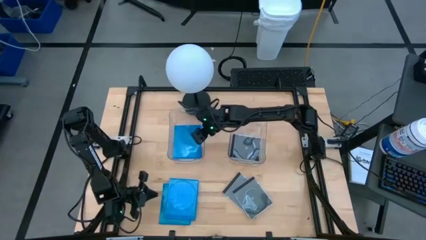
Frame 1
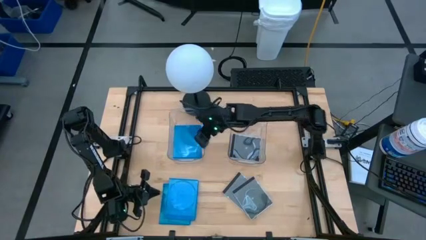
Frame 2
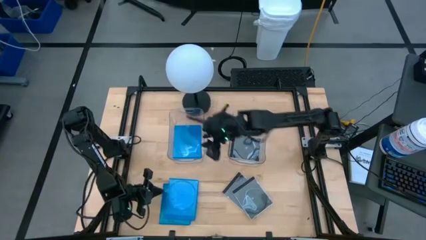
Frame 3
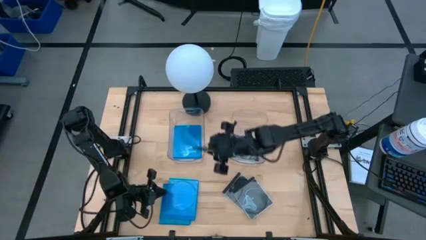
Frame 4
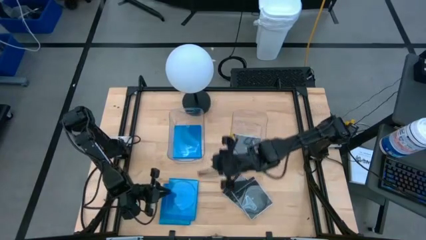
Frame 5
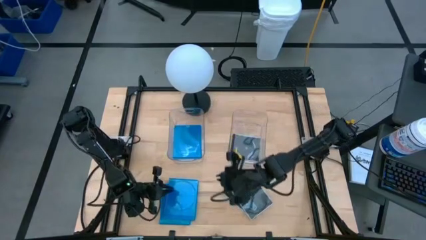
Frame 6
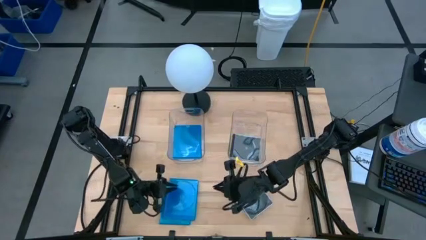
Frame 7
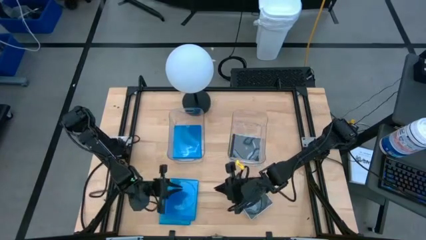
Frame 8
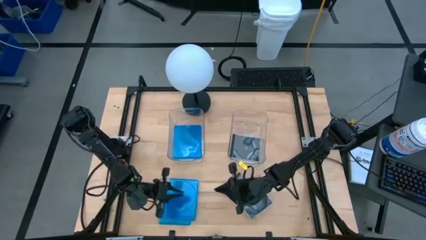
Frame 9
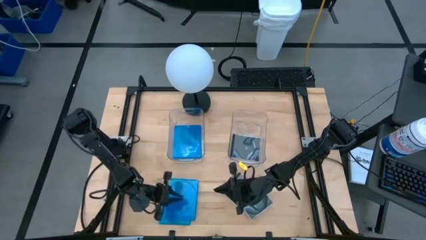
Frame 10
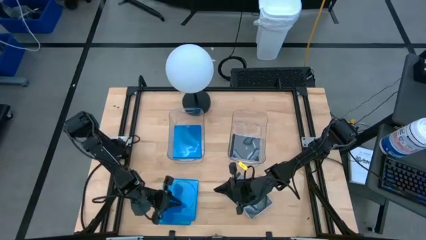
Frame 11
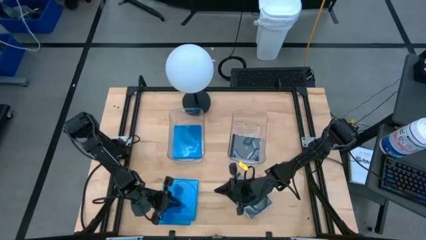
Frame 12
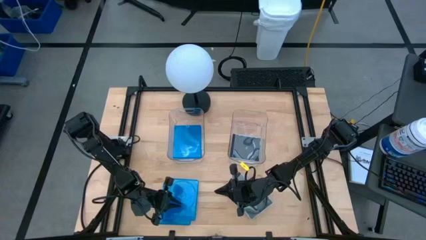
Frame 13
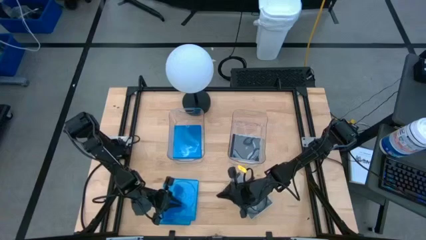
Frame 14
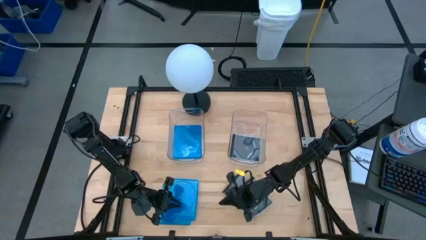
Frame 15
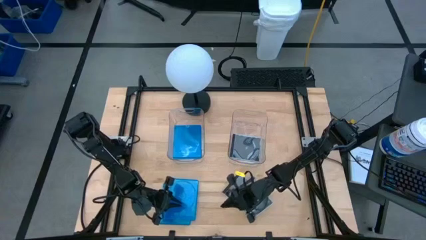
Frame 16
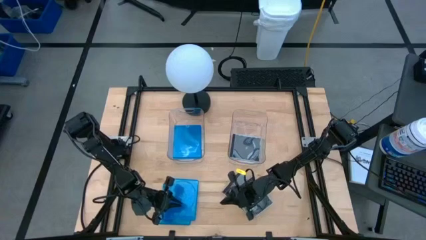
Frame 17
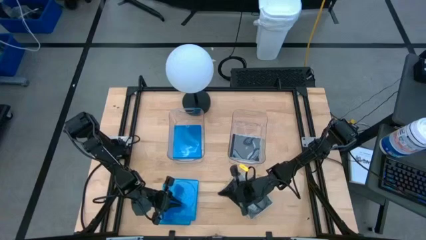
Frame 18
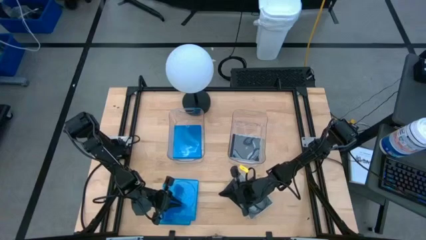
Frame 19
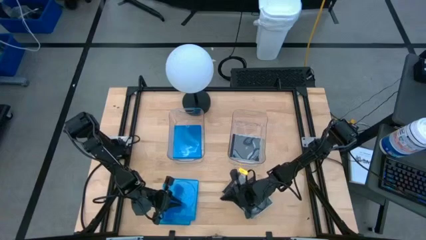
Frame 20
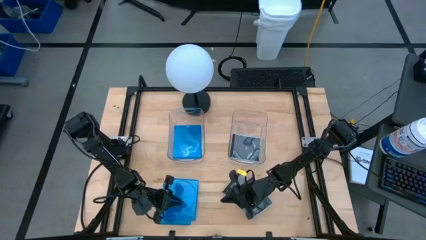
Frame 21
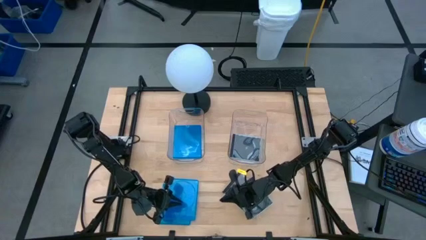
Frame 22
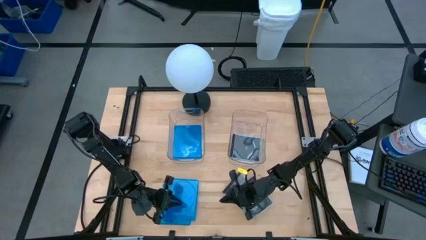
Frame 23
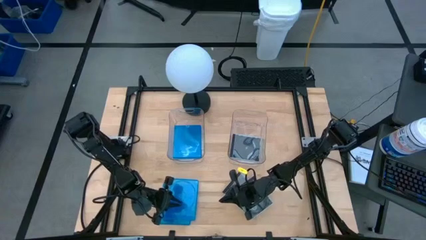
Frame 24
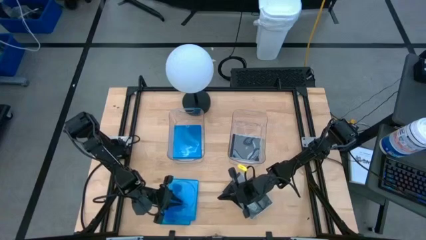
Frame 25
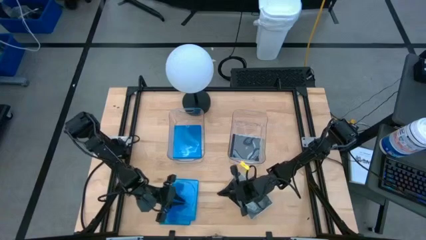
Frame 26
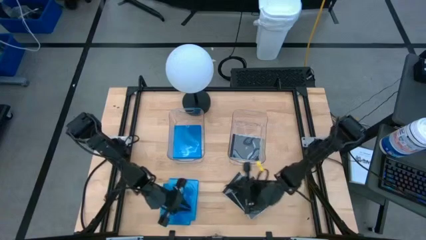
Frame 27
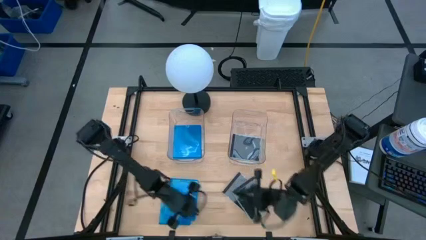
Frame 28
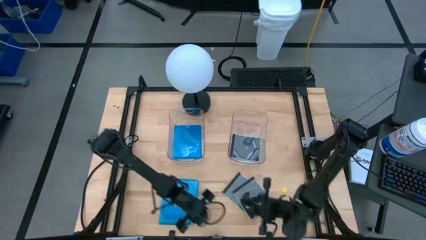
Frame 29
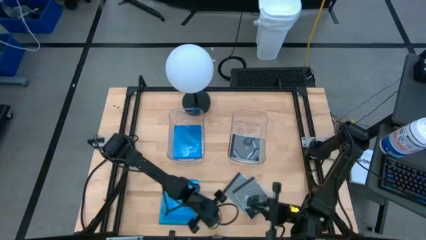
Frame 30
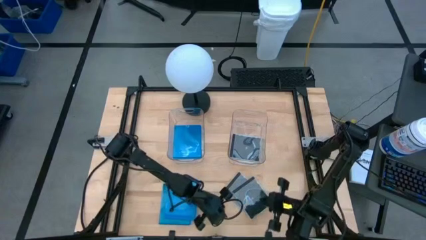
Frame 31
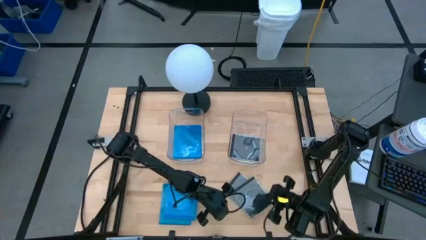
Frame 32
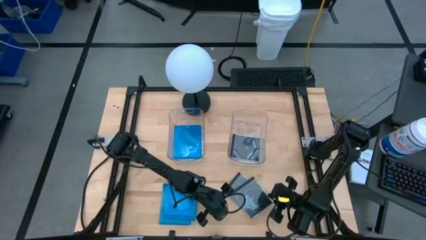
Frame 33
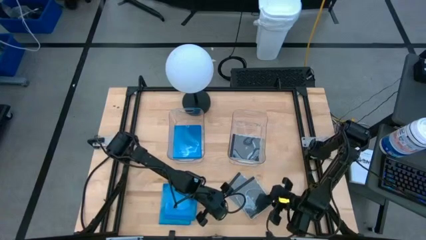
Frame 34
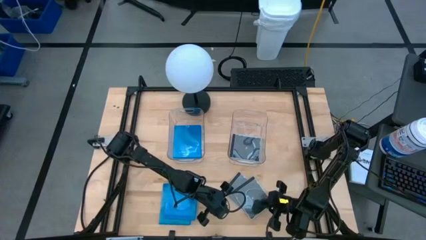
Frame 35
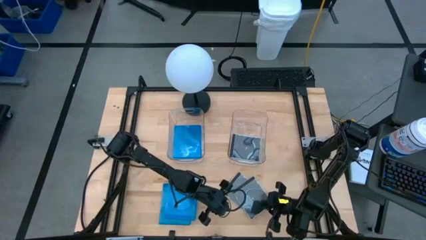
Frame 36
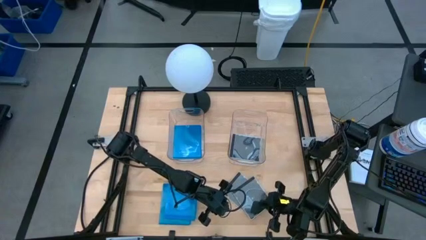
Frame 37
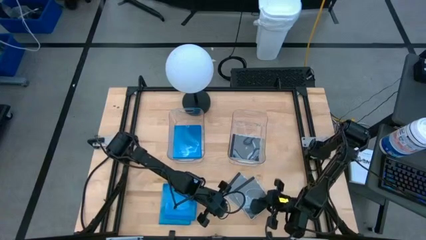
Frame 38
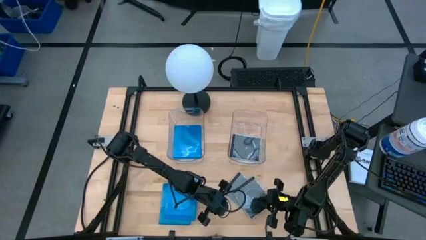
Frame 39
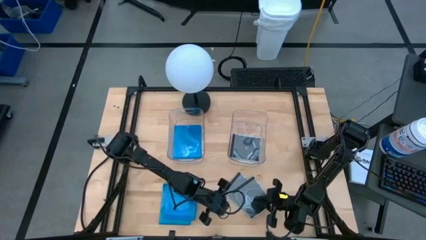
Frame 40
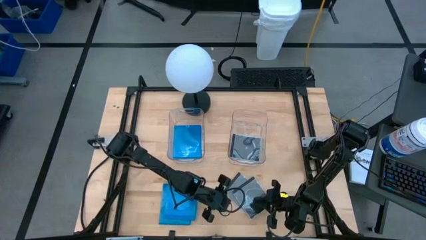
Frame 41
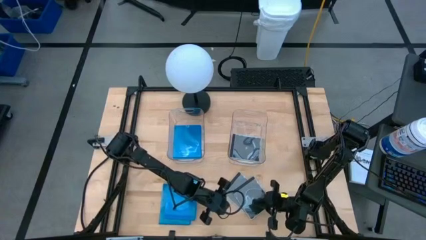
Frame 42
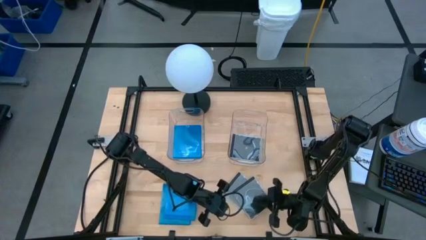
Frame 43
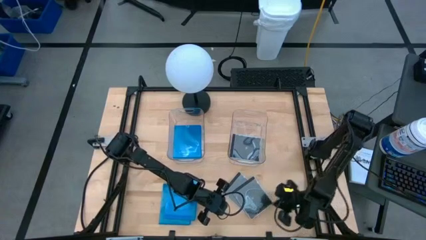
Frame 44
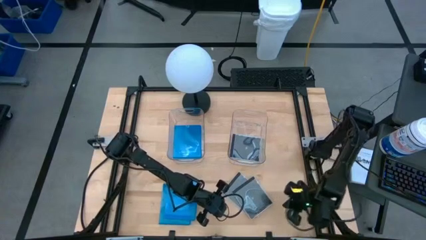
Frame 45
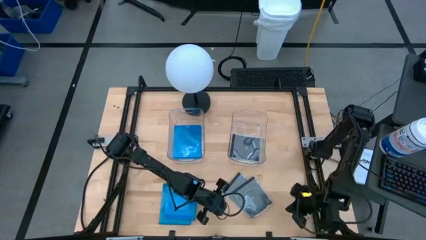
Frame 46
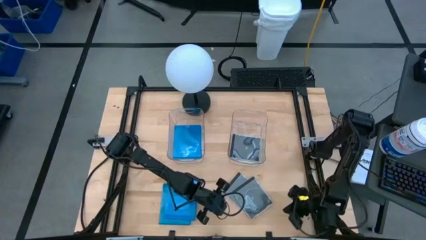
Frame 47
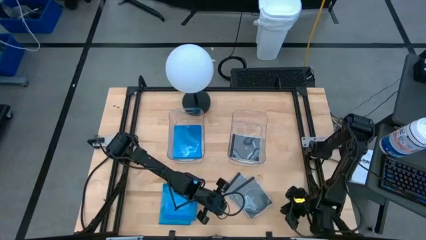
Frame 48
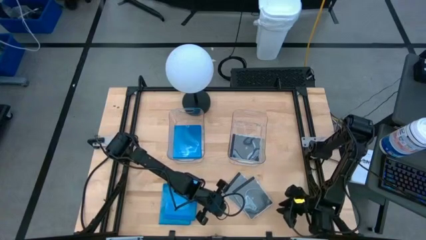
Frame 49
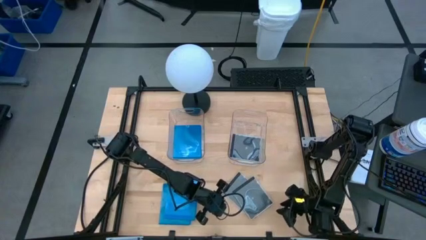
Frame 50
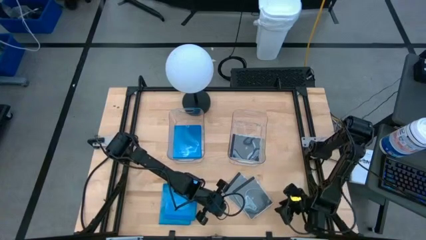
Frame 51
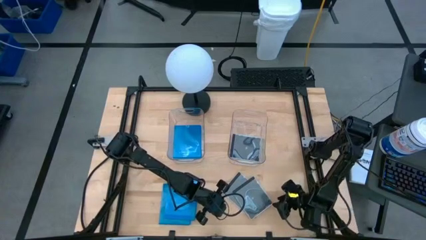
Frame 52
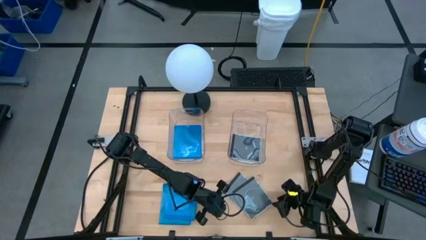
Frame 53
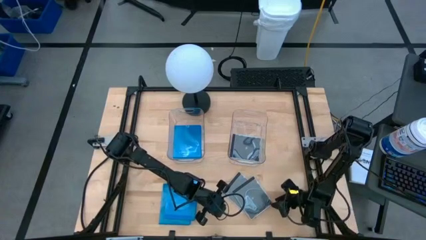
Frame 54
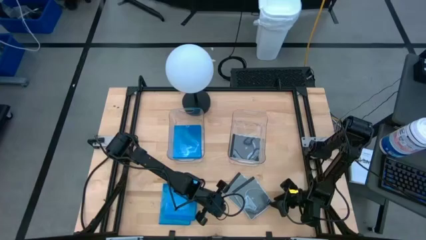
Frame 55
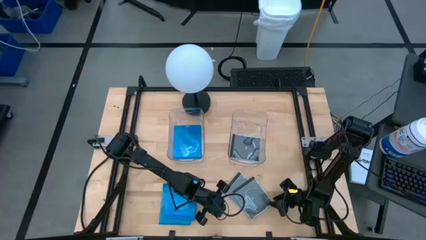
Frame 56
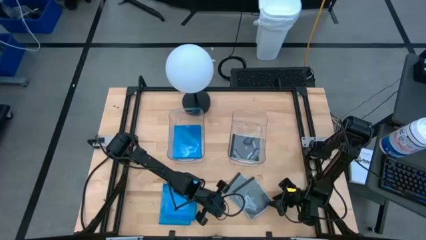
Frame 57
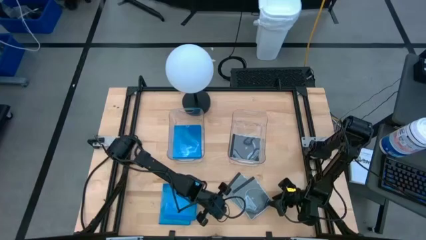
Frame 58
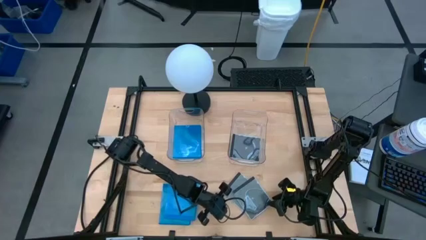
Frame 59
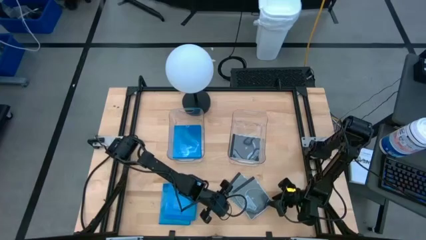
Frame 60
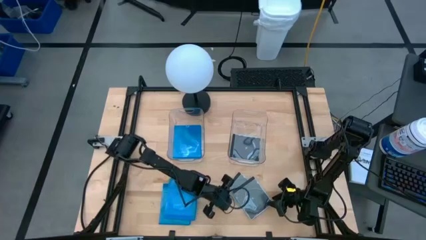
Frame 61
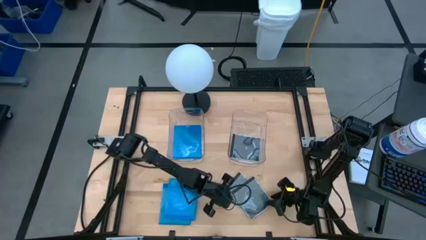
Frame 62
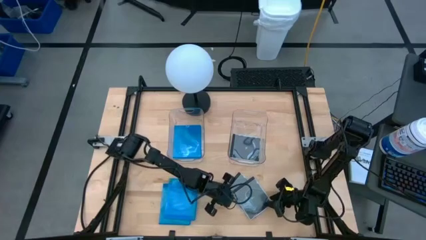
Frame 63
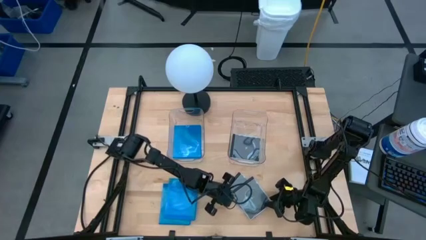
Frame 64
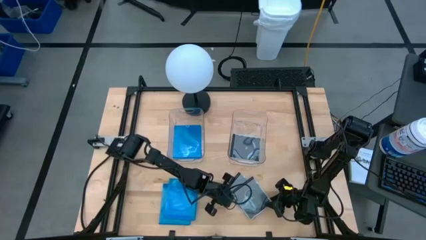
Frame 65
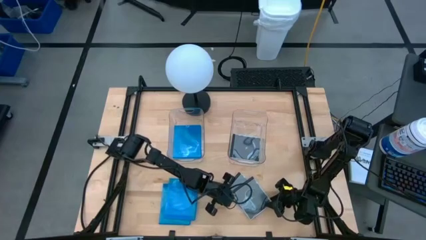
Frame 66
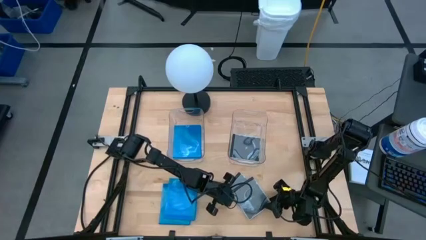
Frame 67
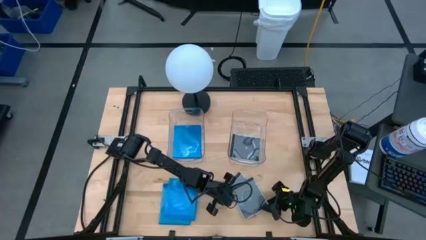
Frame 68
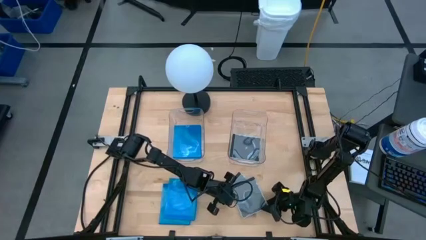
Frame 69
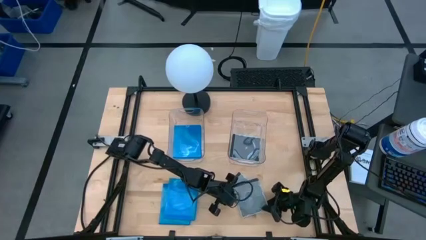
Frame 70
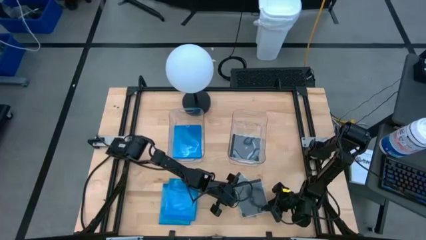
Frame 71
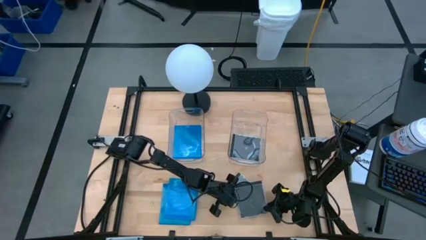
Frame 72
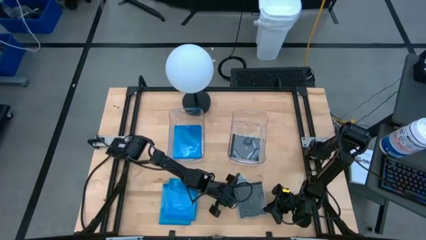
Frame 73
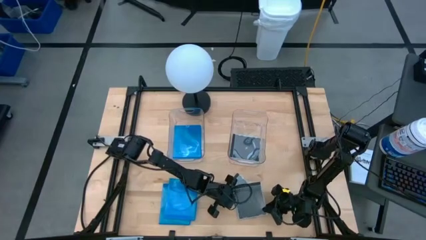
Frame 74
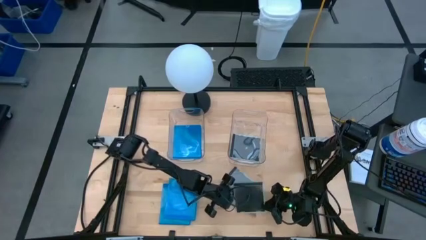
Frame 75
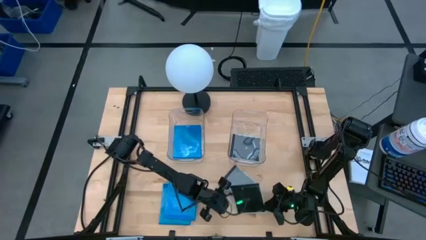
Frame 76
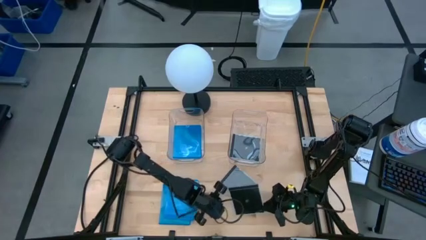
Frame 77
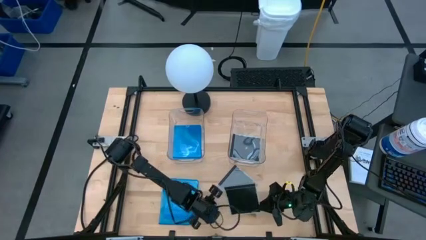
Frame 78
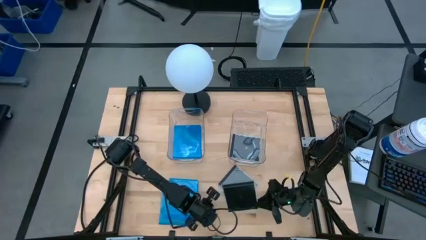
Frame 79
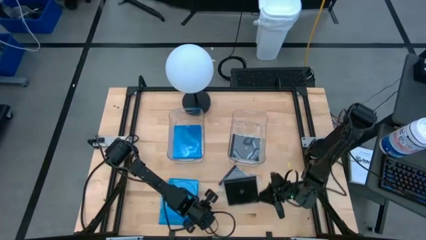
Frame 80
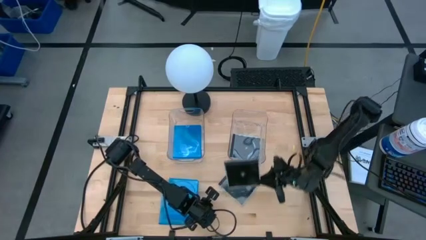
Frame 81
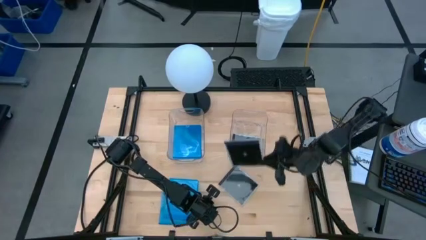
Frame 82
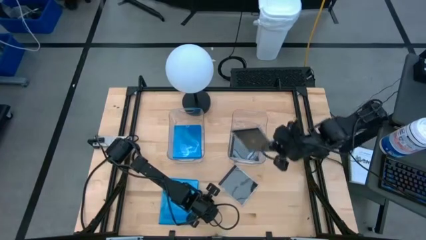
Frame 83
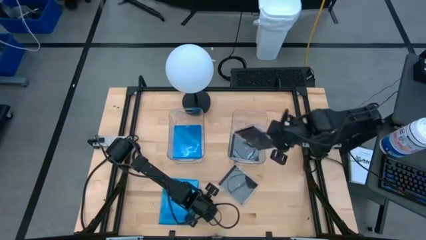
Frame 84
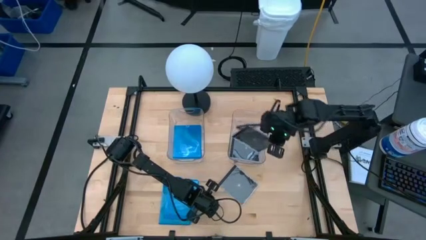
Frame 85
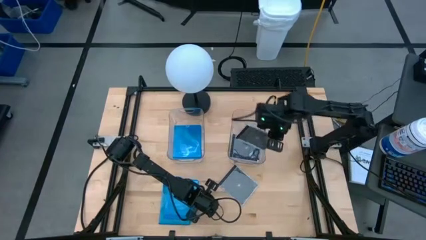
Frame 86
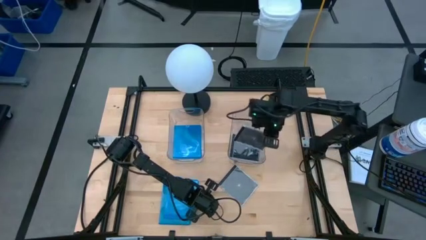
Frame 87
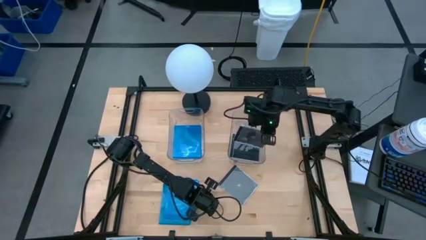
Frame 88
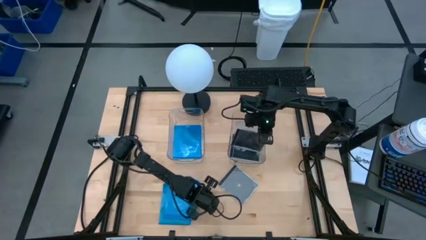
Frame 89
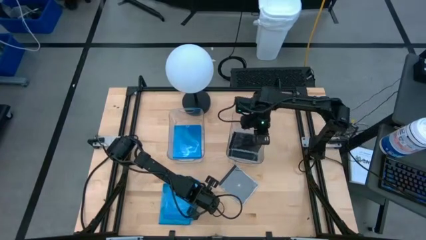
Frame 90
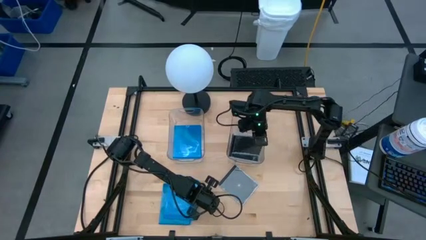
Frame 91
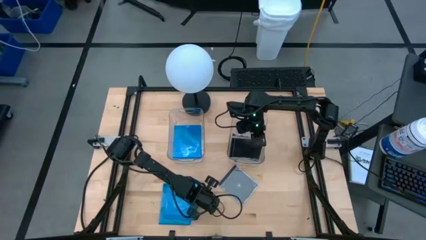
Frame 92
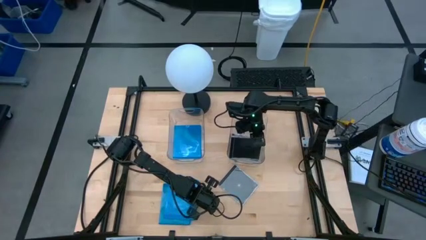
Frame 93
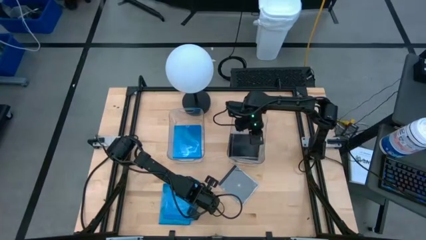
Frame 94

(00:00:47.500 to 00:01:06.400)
Task: Pick & place jewel cases by type
Put the black CD case into the right transparent bin
